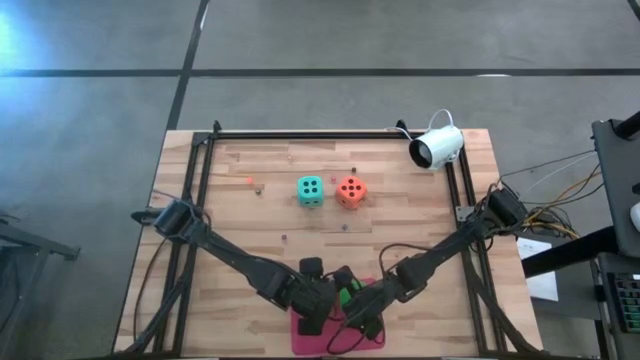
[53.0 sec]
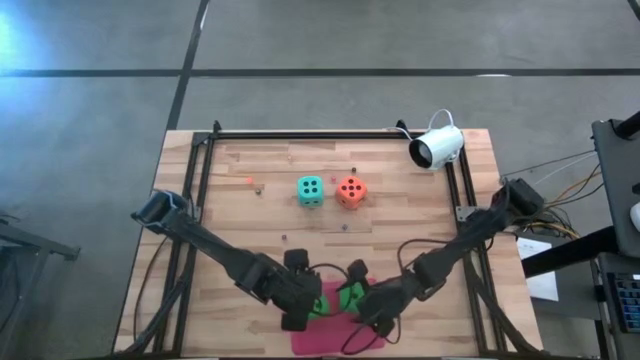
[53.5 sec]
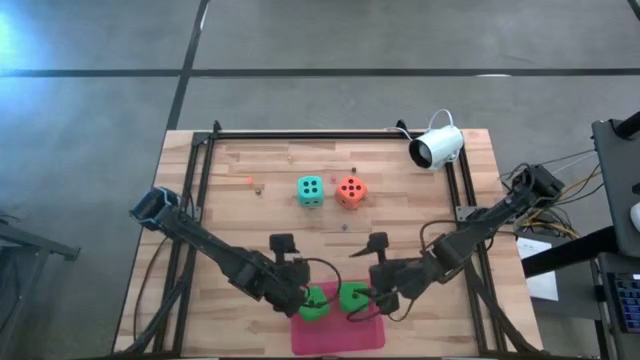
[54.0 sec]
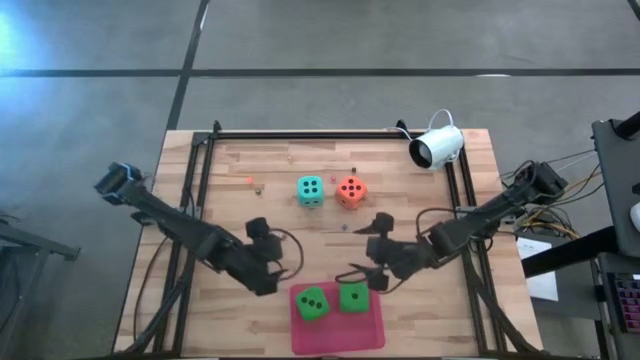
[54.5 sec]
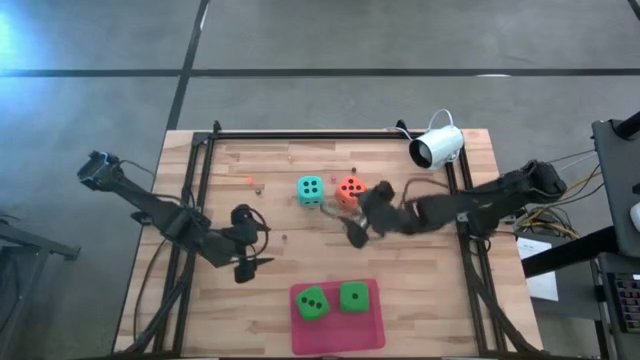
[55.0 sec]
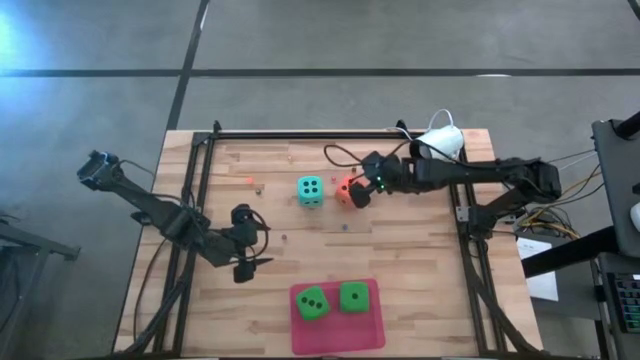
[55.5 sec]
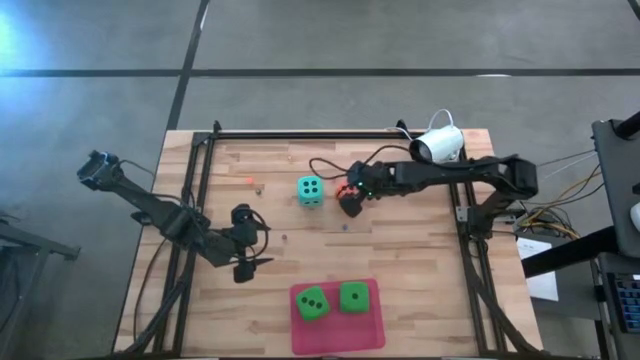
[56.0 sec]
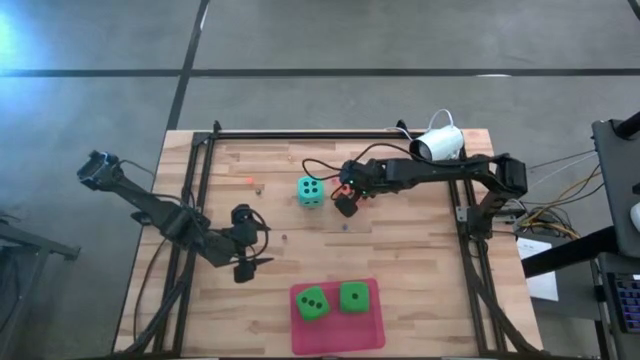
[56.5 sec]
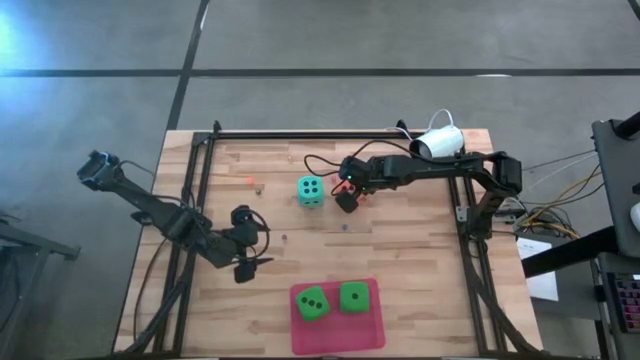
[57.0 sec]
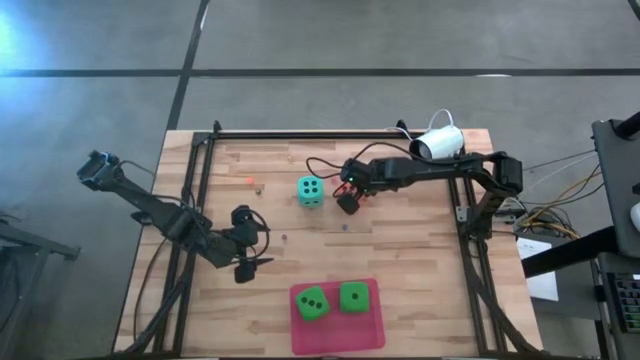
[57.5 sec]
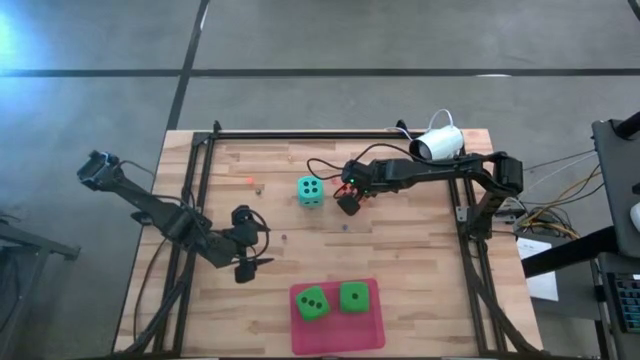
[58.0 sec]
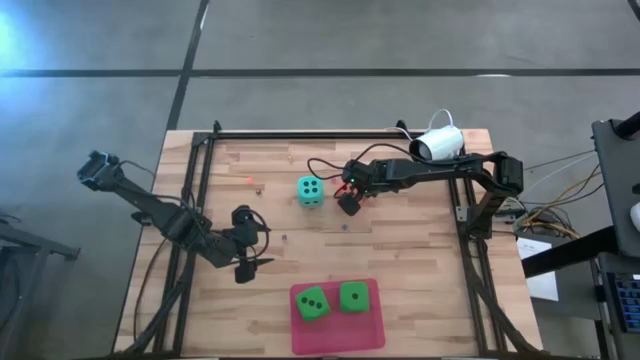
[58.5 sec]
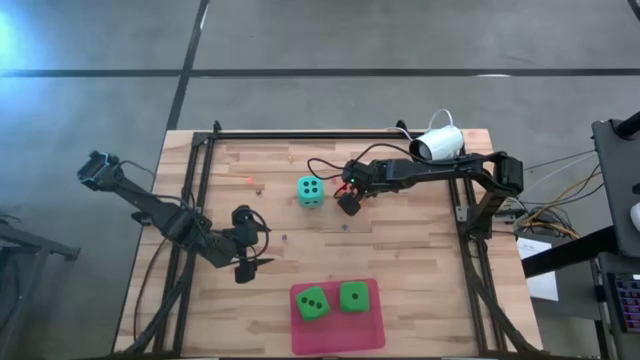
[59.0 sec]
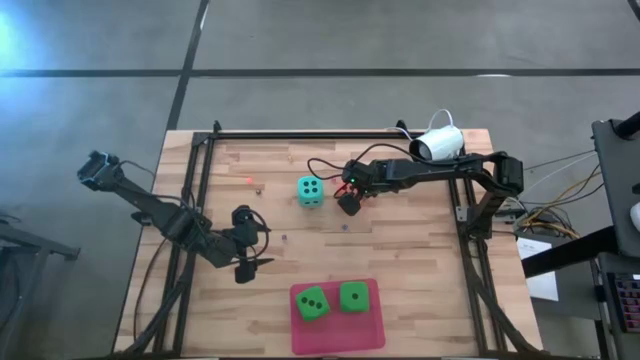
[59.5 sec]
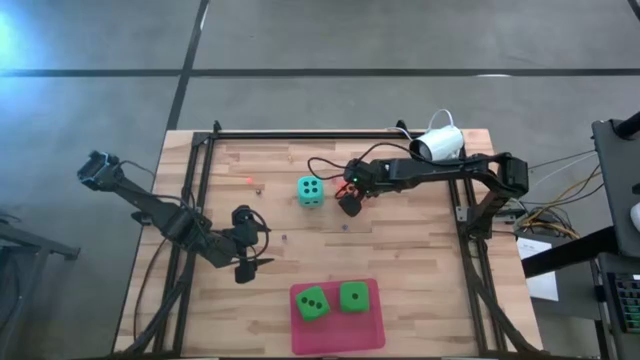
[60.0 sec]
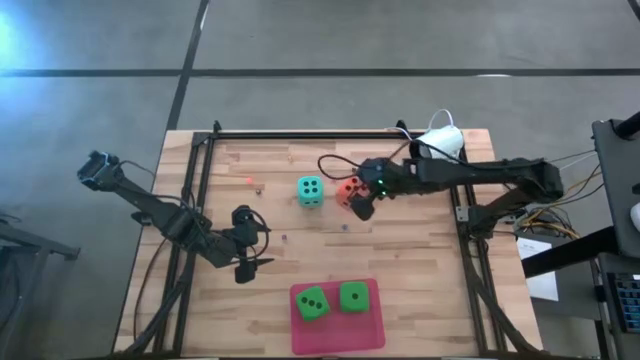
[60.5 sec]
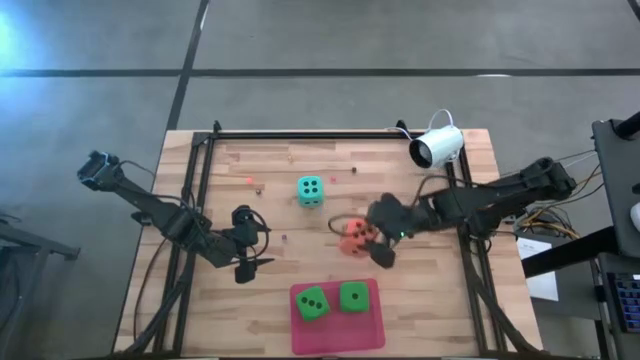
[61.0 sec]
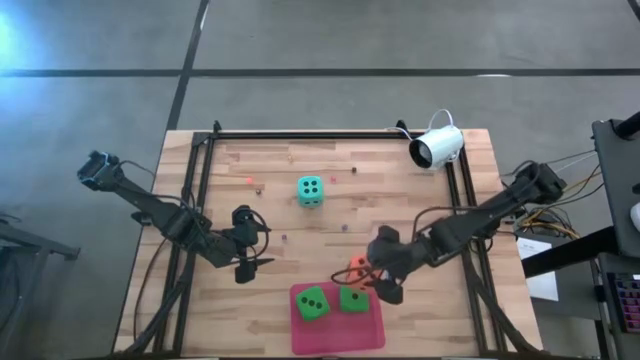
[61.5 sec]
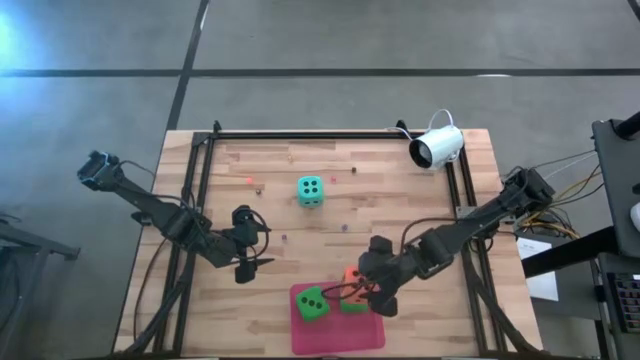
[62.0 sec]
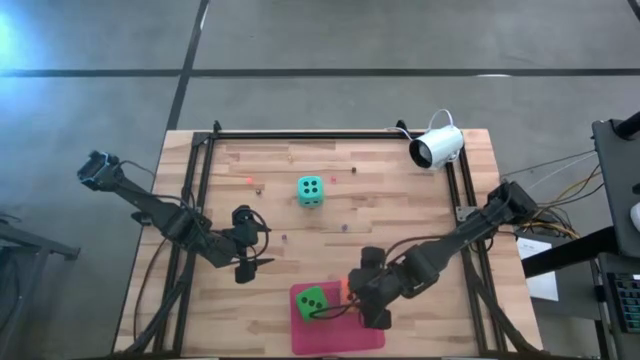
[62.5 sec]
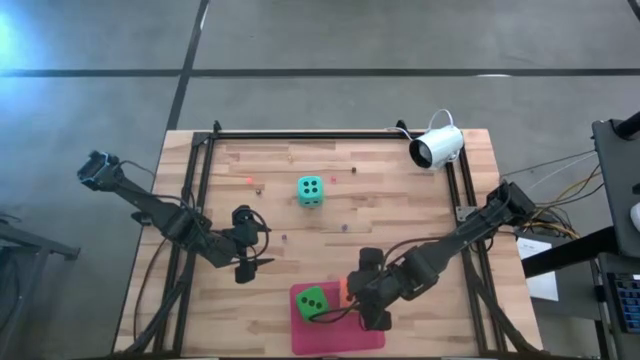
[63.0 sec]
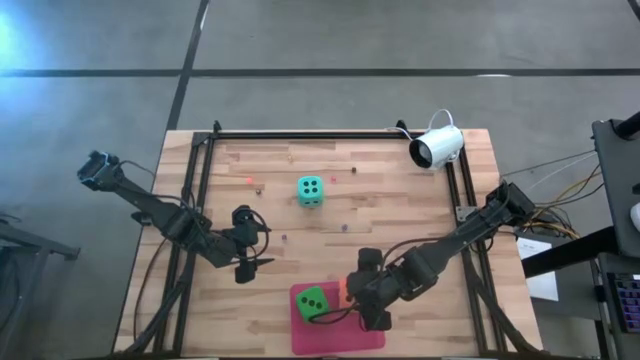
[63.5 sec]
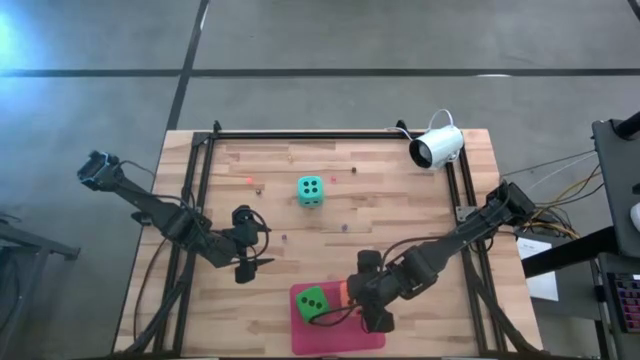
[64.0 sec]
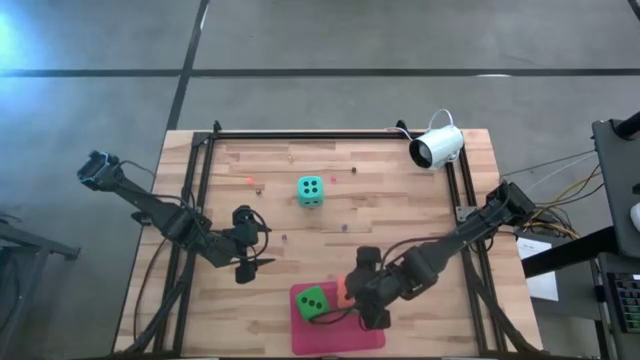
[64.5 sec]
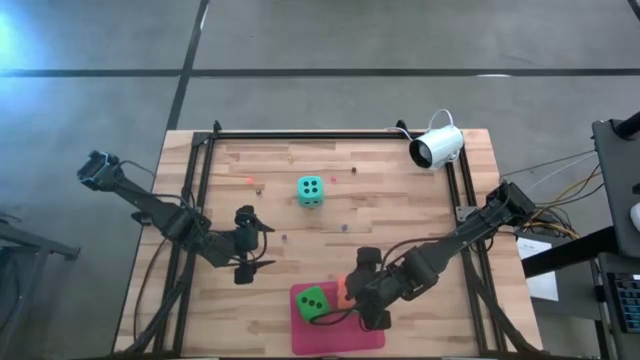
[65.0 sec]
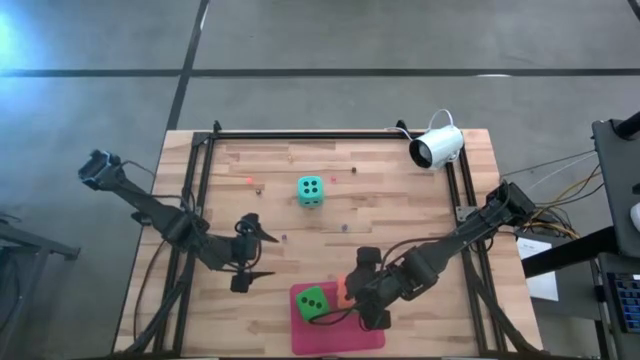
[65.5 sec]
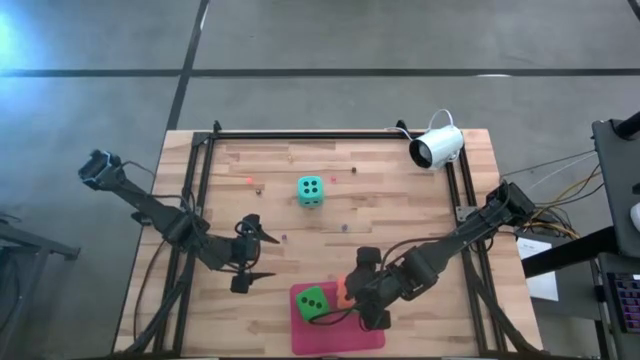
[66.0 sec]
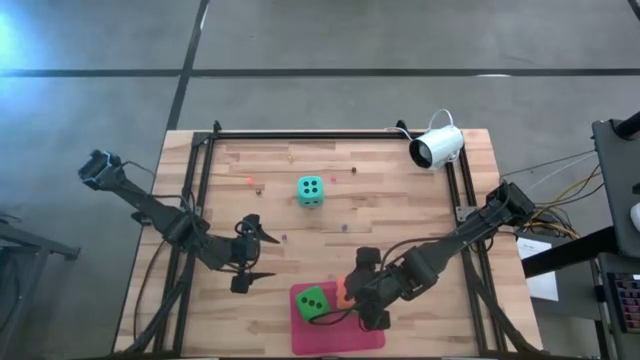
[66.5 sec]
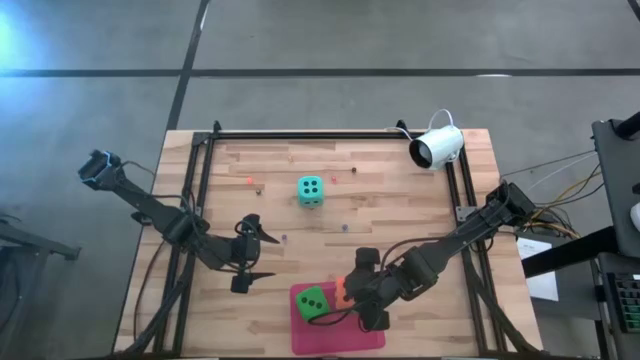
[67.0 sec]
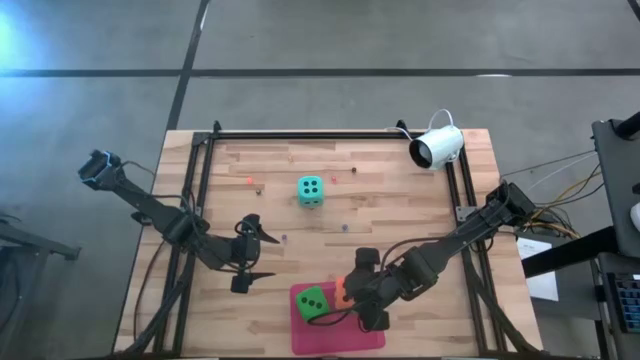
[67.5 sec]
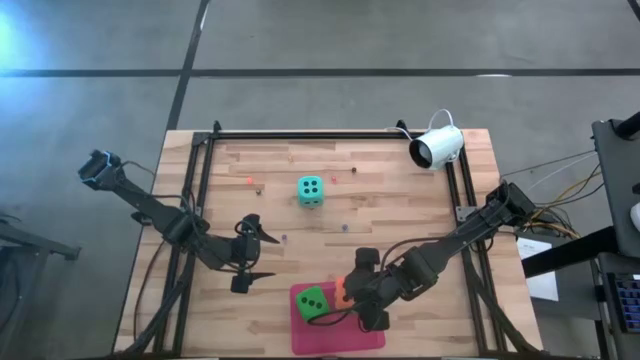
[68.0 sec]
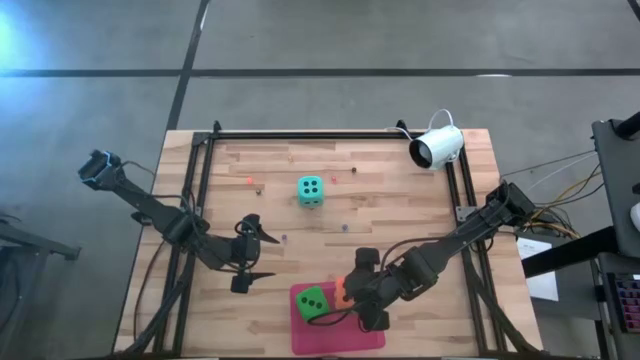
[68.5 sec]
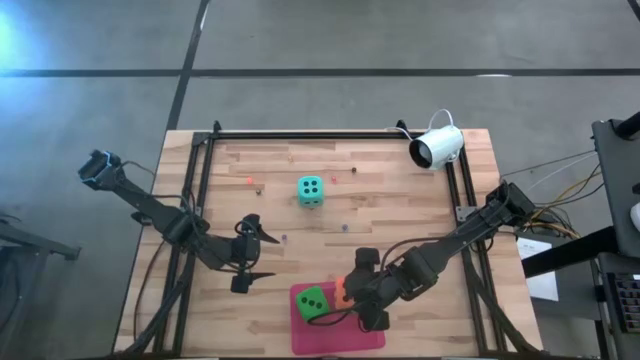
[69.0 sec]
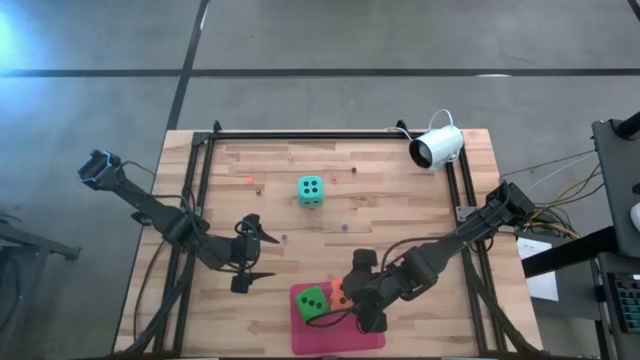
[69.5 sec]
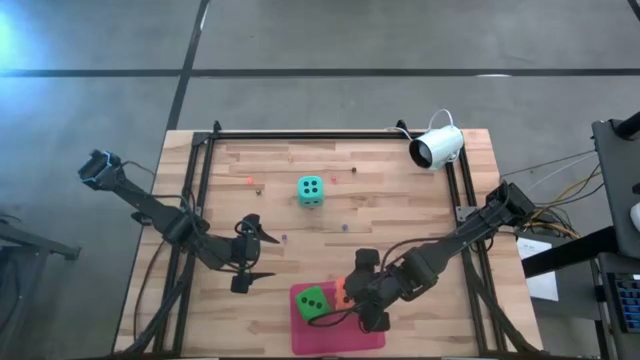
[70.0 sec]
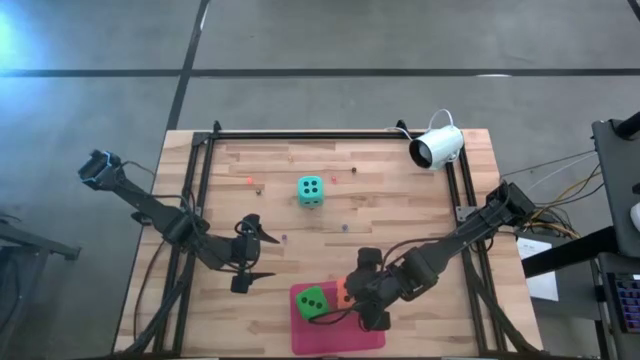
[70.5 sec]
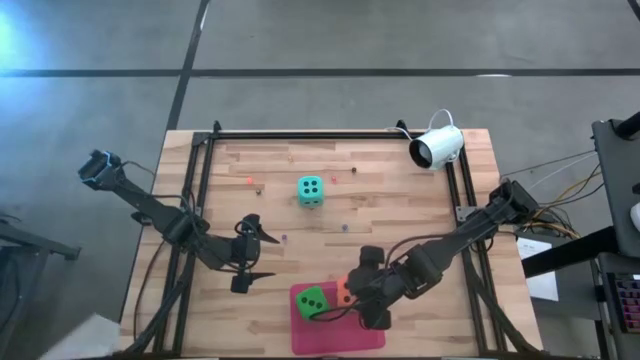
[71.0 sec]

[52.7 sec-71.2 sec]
Task: Pick & Place Dice
Put the large orange dice into the pink bin

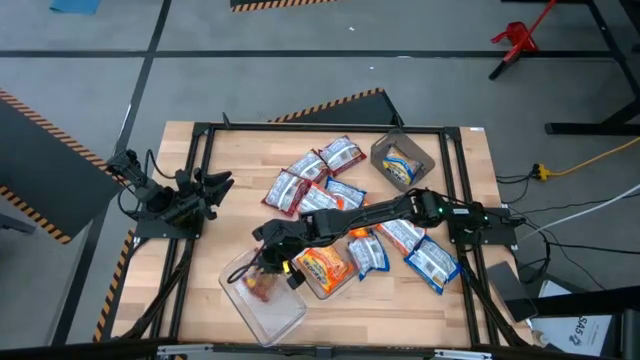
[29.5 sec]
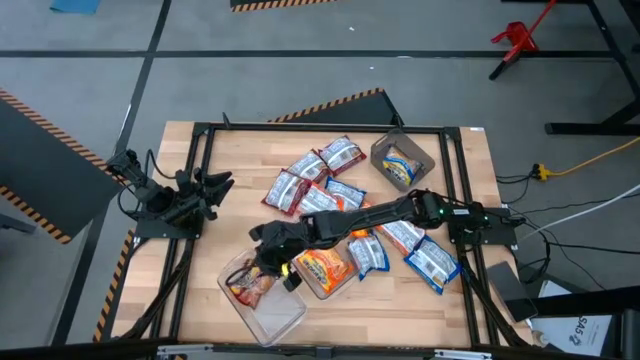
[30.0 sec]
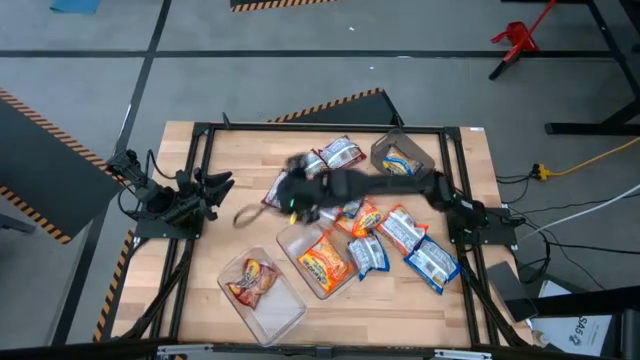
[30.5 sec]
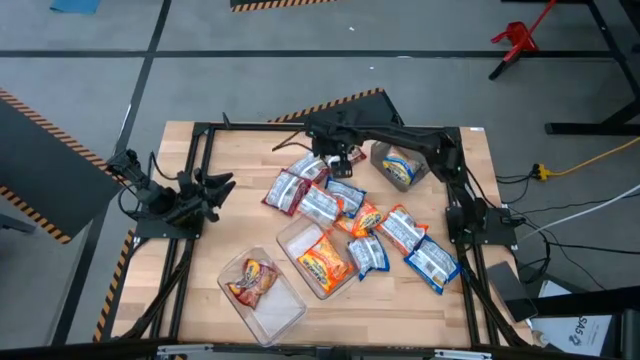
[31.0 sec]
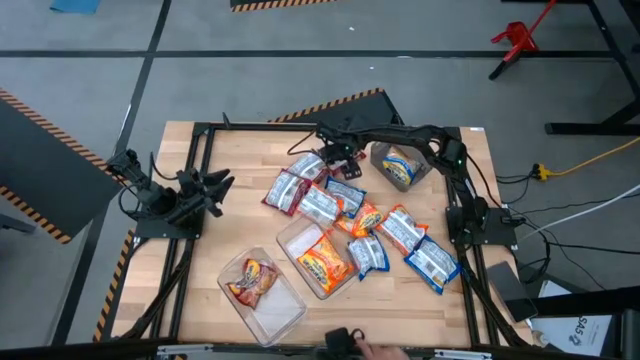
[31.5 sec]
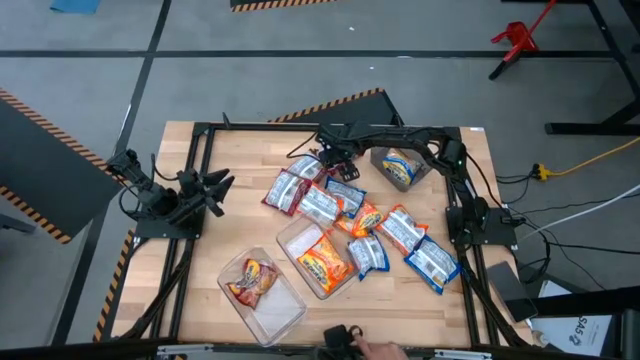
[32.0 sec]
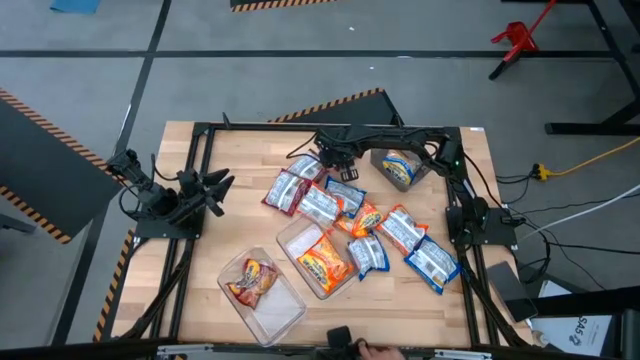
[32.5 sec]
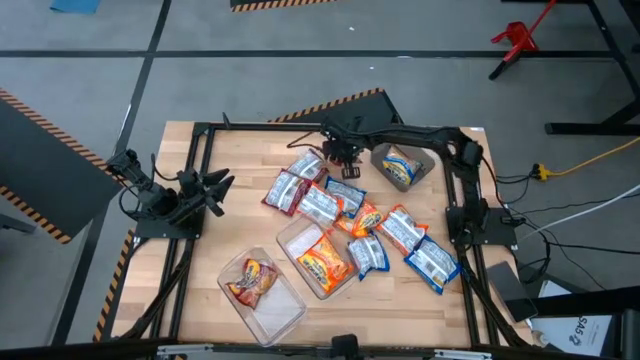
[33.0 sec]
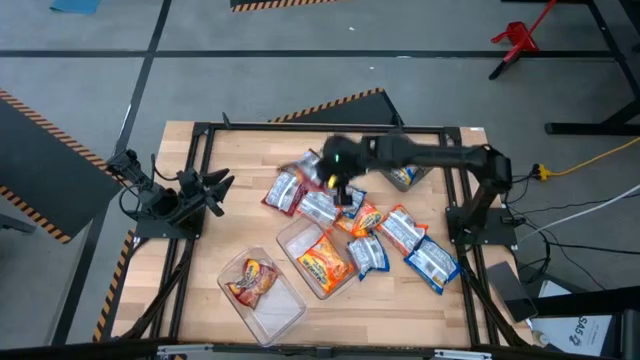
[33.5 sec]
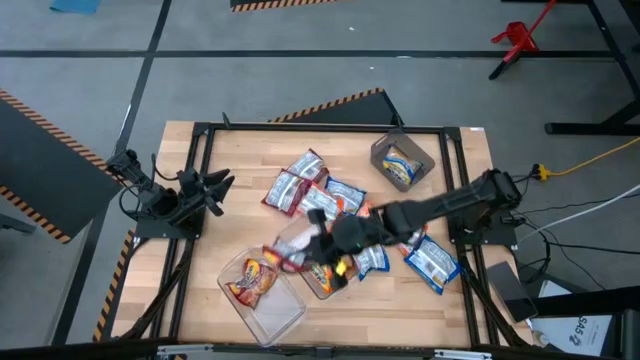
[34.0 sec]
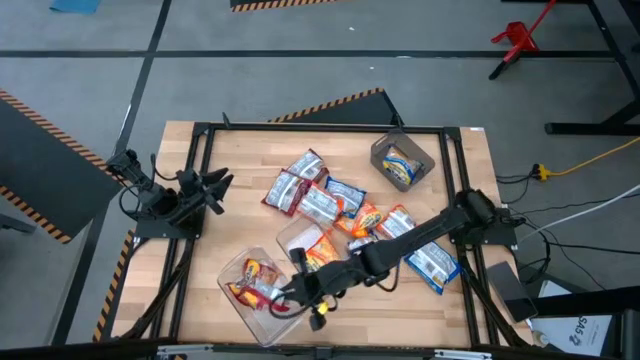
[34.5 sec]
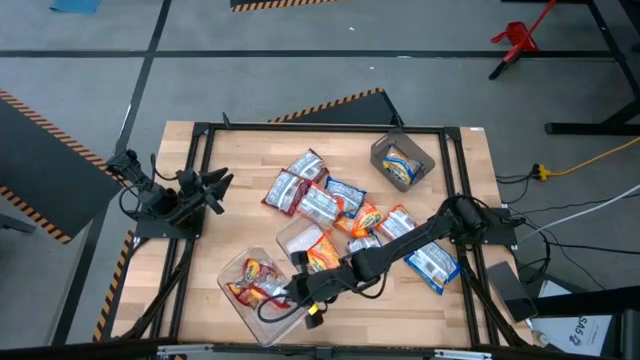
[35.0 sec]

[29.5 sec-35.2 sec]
Task: Sort Maruchan noodles
Put the red noodle pack into the the bottom transparent bin
